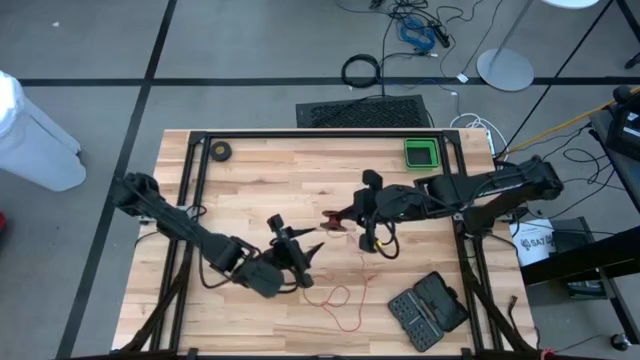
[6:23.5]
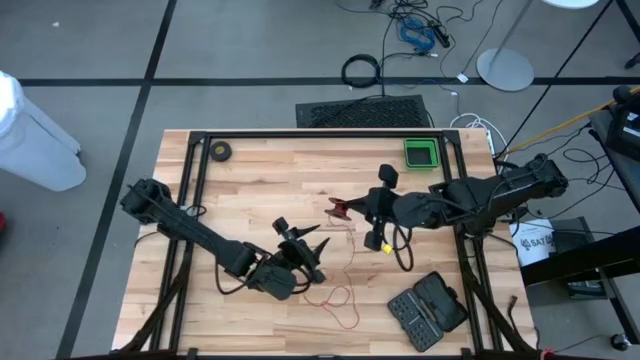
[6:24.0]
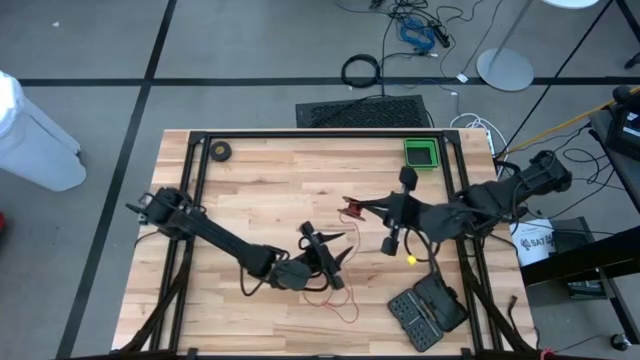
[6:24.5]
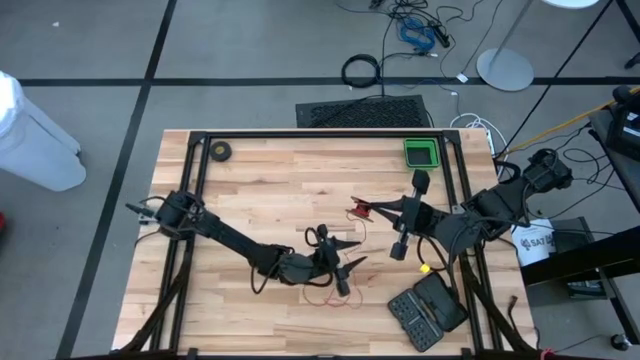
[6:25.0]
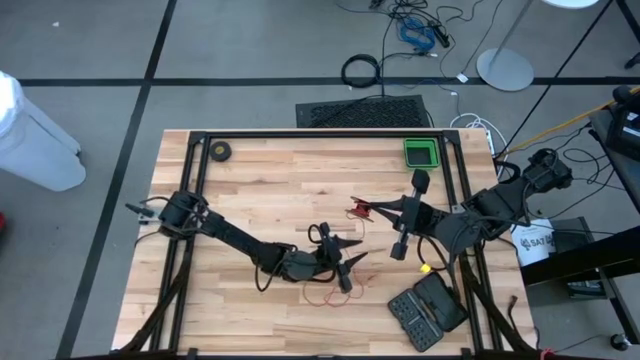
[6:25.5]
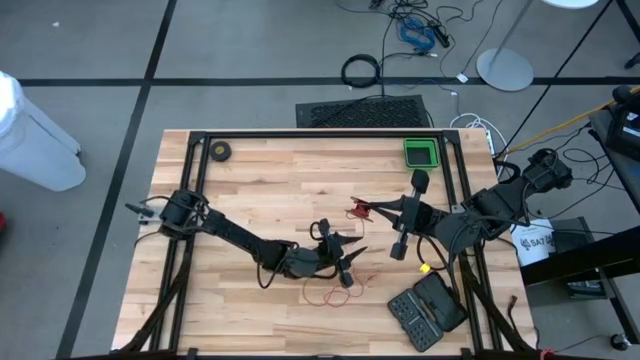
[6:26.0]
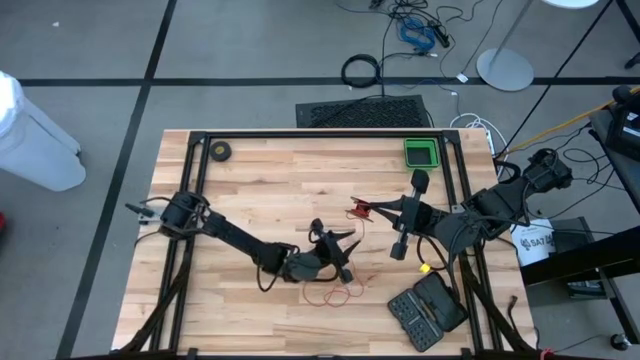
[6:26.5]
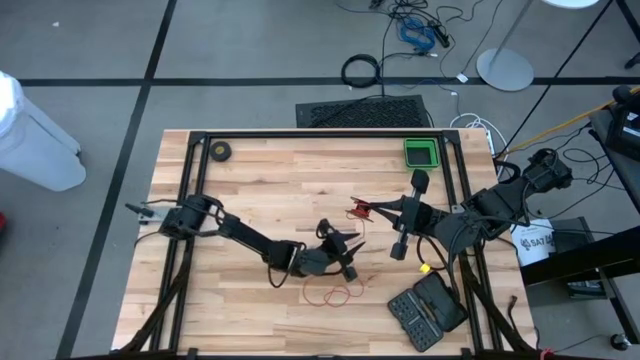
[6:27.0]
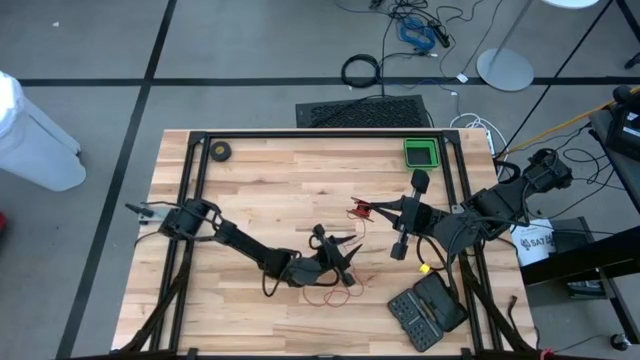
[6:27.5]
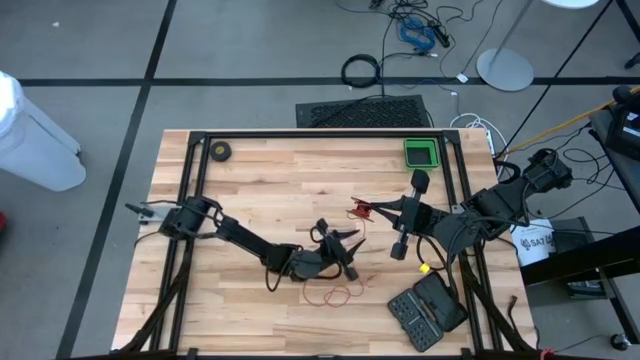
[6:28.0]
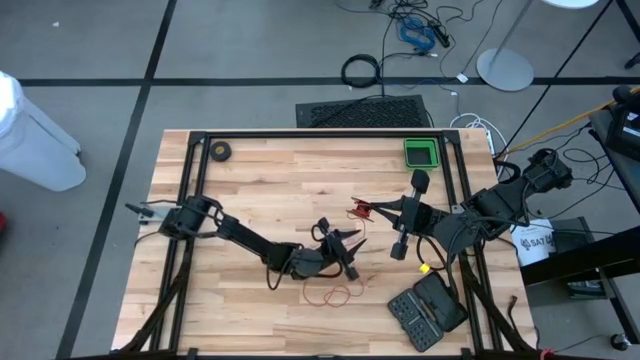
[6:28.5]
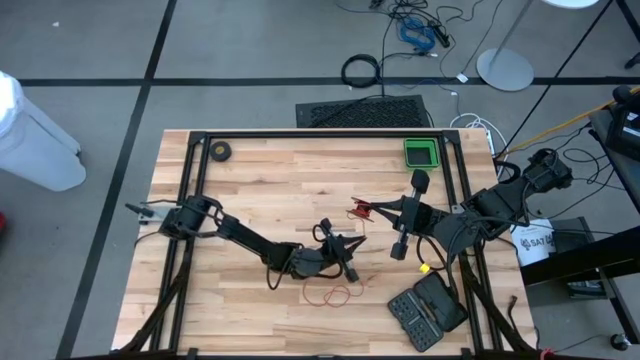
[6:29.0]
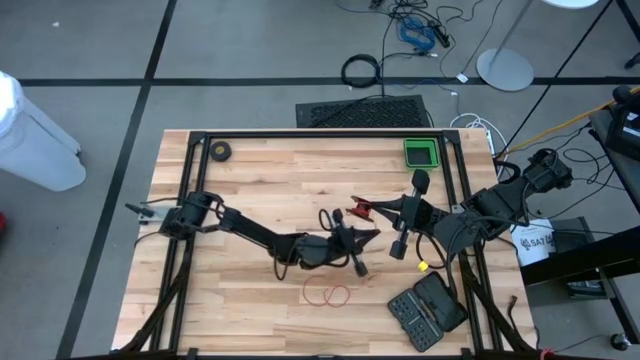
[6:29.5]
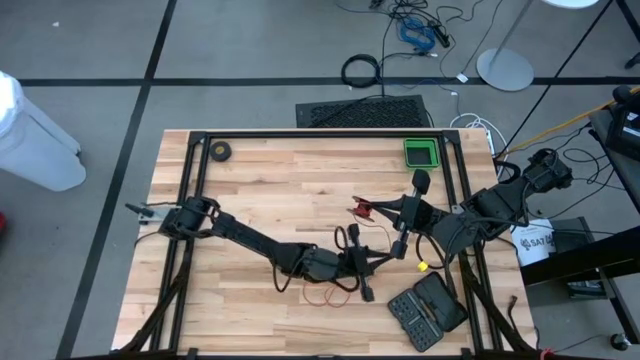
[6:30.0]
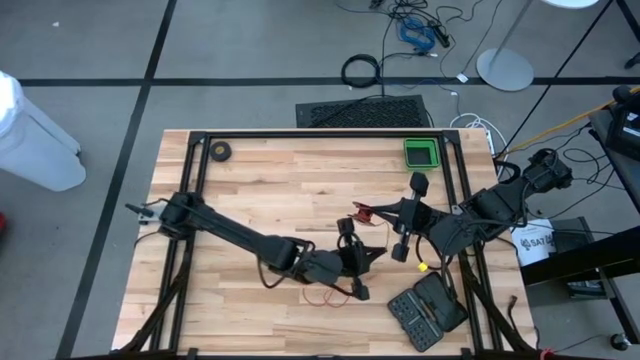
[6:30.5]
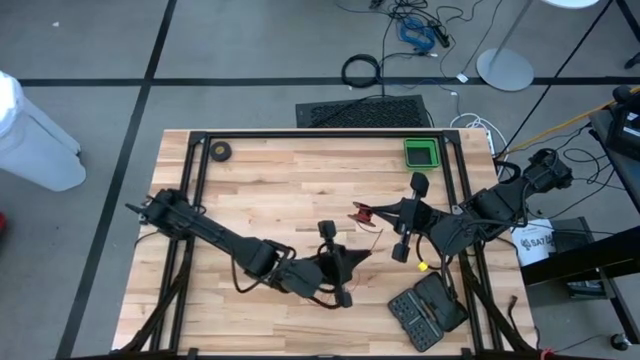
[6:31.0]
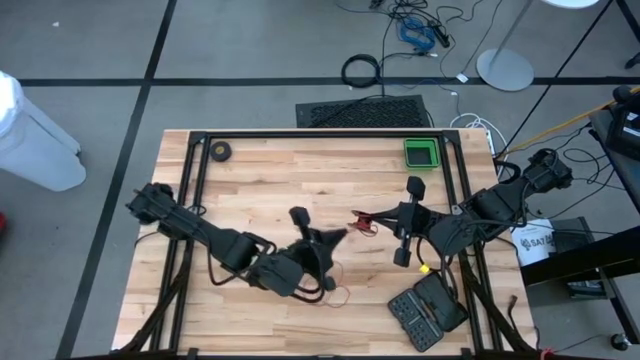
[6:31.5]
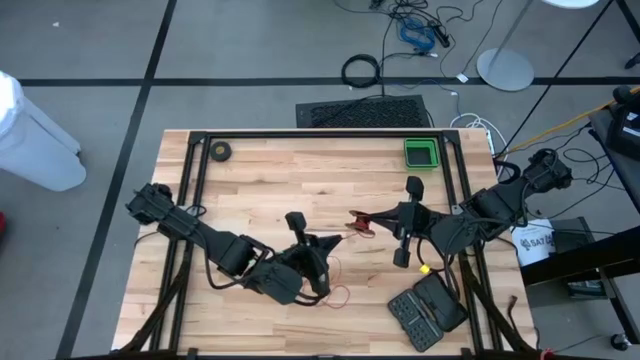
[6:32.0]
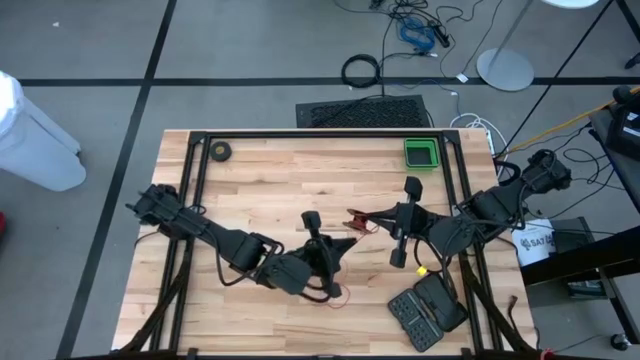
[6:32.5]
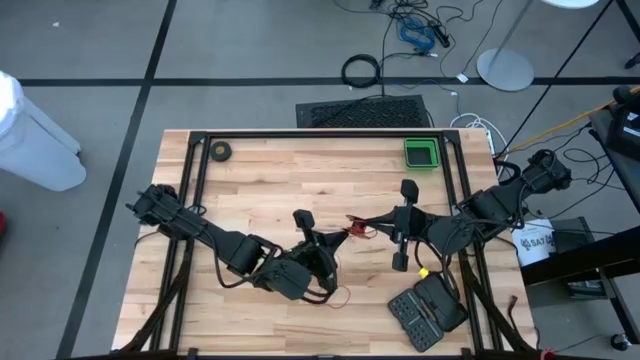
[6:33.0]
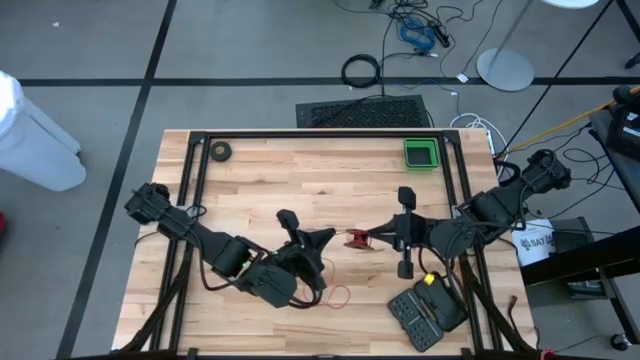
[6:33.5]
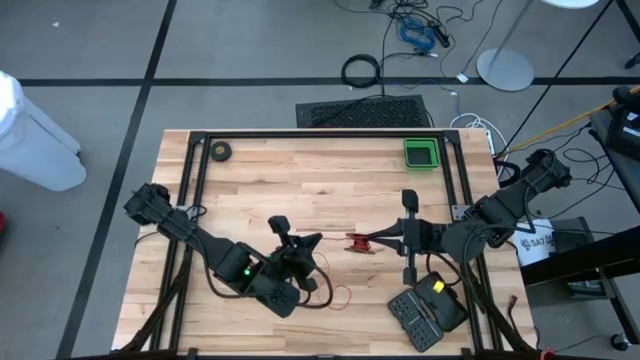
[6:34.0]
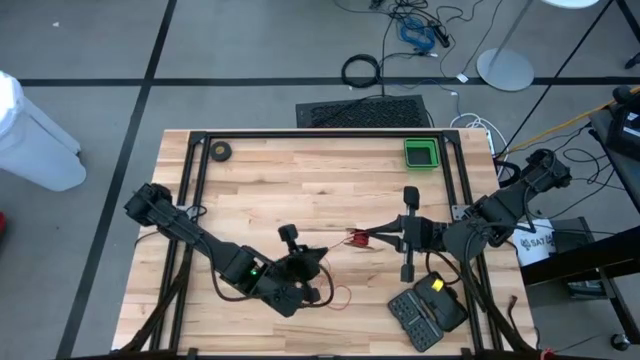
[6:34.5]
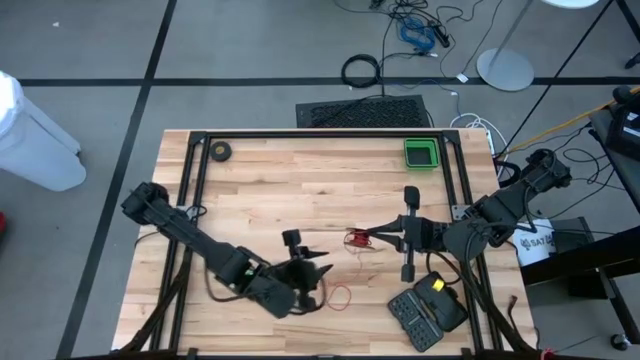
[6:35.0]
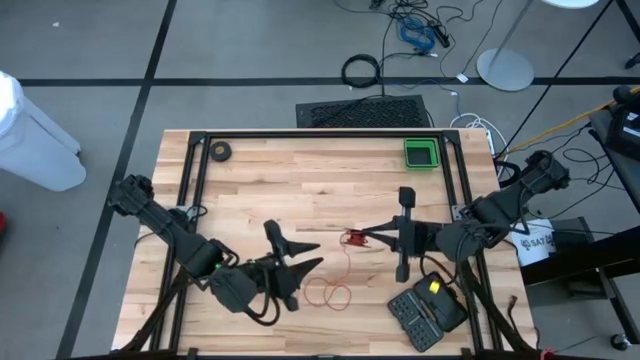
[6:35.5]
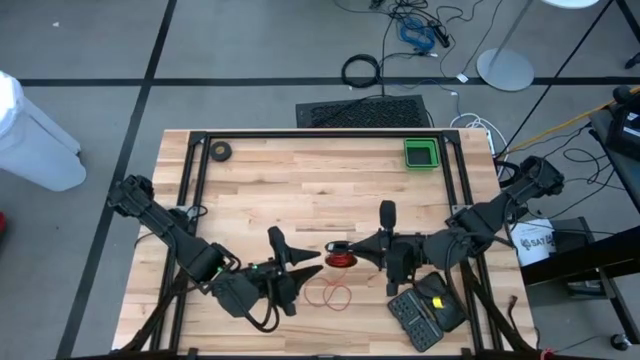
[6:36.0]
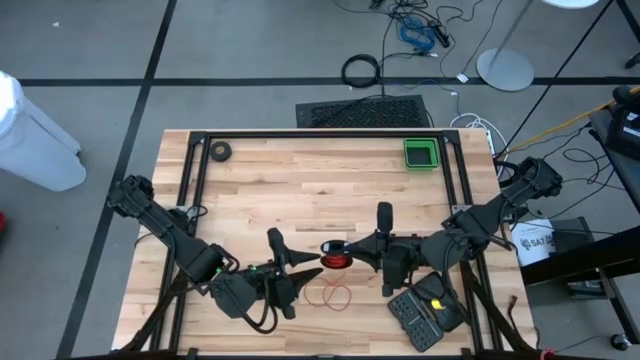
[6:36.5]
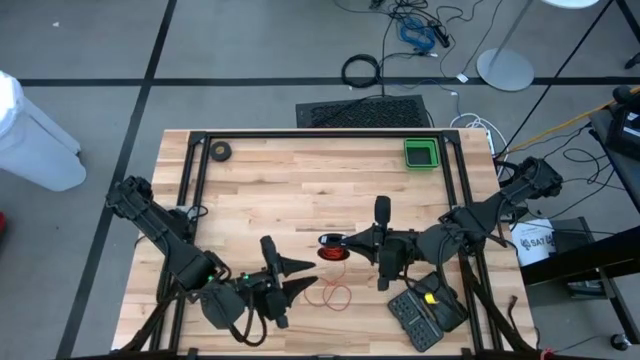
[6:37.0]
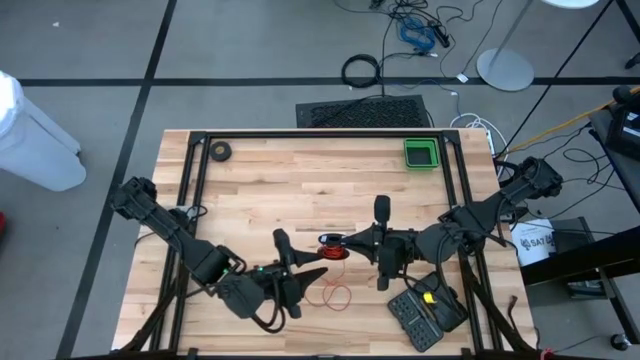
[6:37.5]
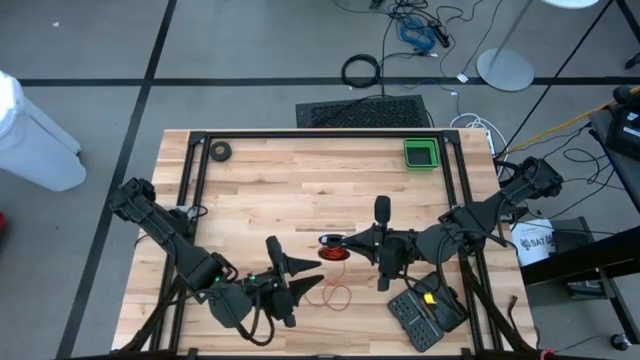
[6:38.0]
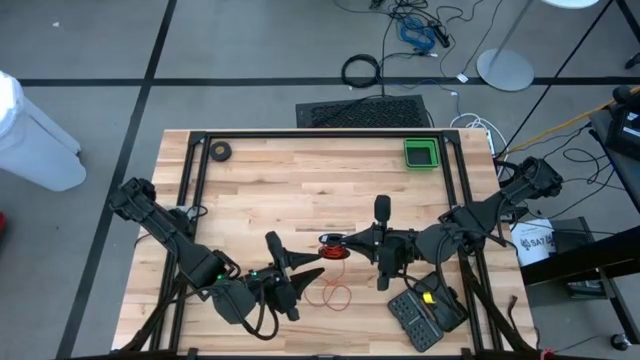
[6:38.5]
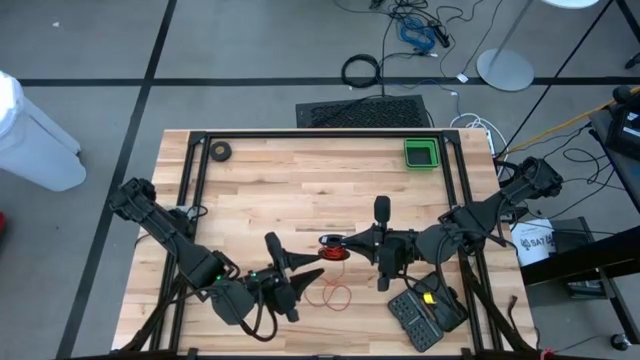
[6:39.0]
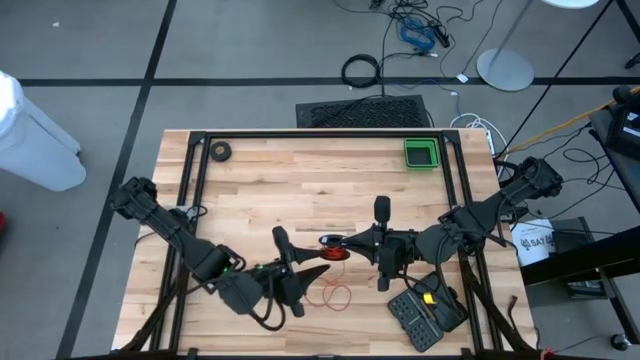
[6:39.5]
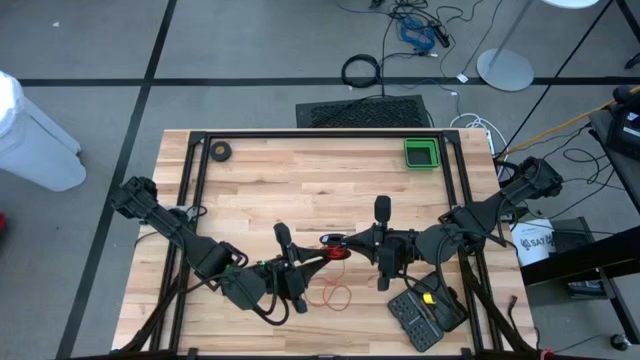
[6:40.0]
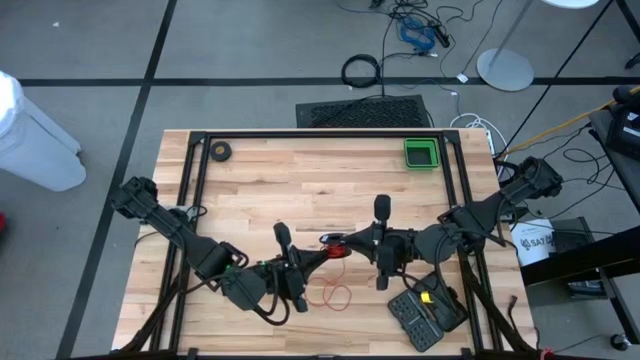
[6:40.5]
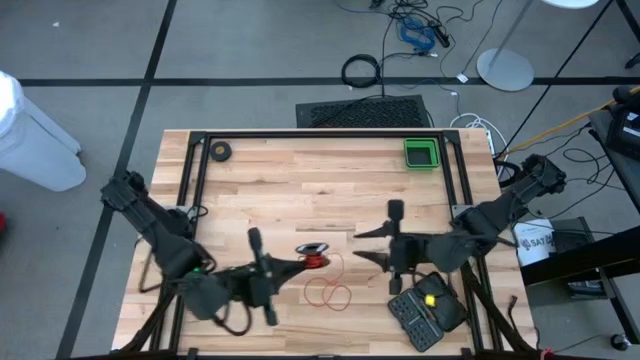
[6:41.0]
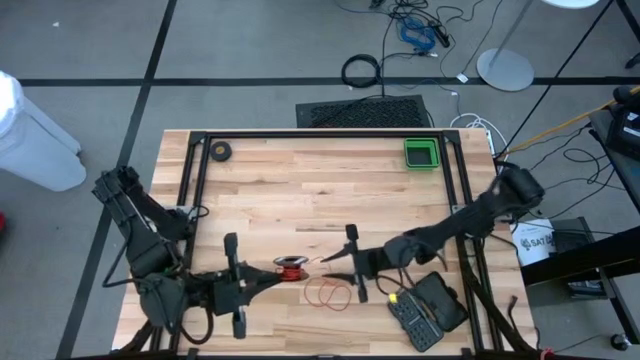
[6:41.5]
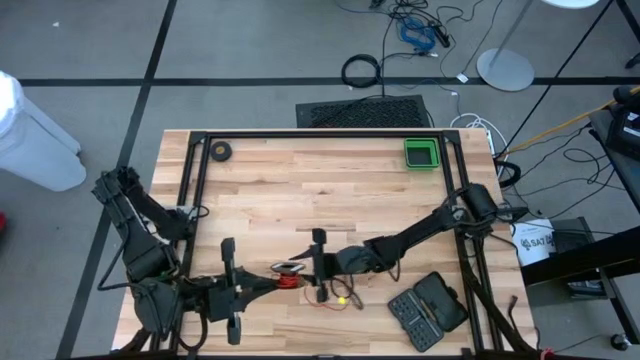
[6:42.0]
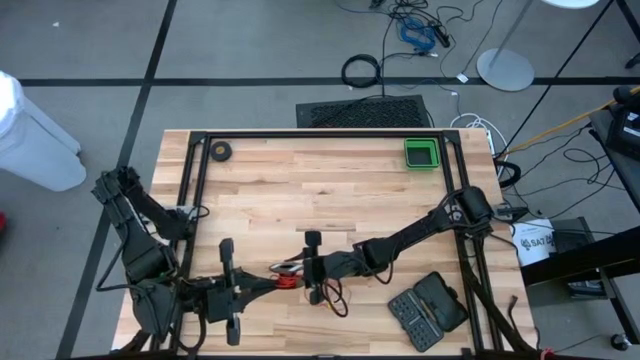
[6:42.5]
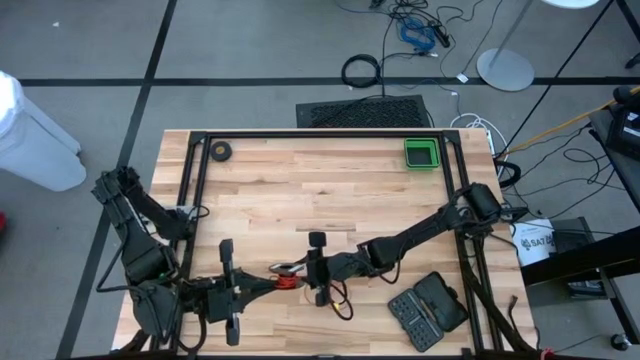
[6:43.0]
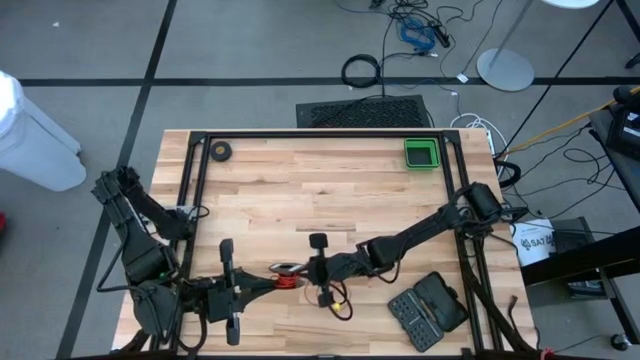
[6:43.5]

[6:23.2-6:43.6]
Task: Coil cords
Coil the red wire into the spool
